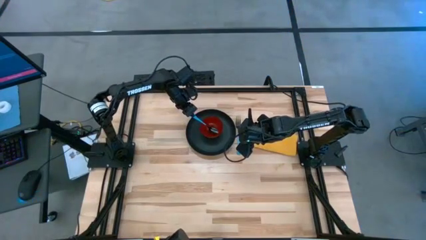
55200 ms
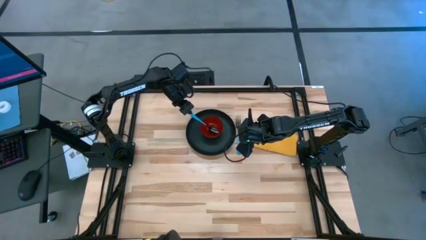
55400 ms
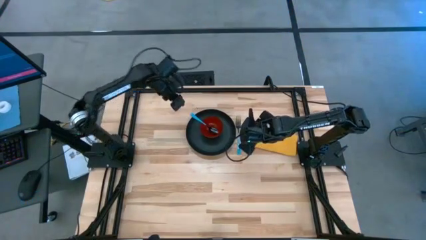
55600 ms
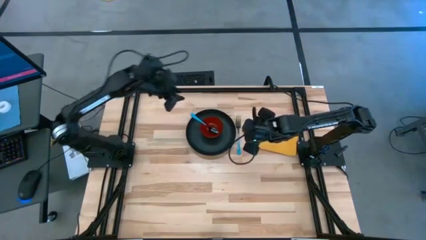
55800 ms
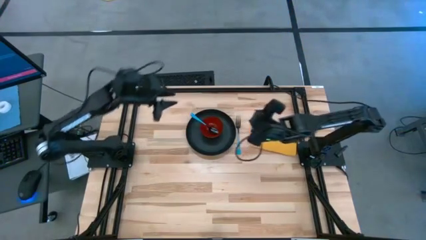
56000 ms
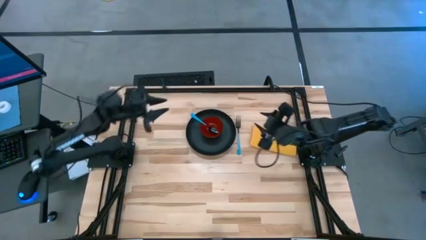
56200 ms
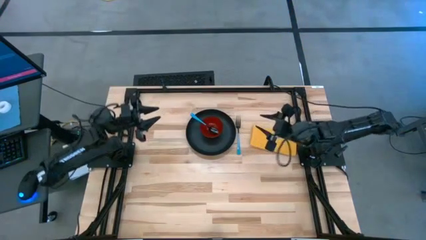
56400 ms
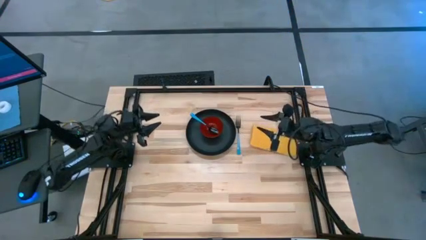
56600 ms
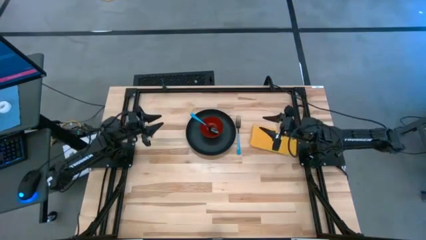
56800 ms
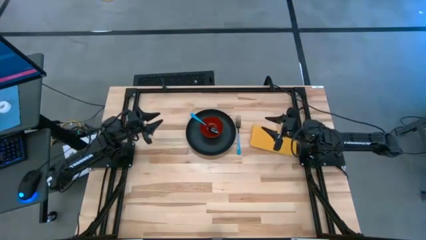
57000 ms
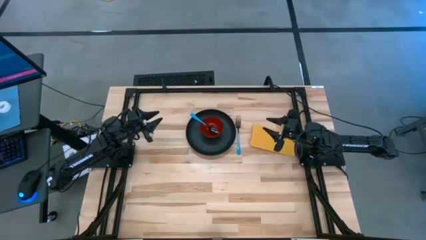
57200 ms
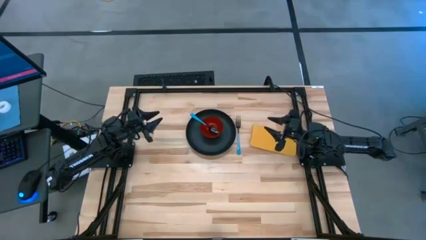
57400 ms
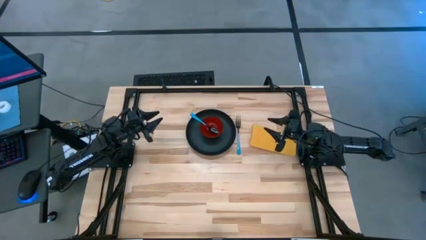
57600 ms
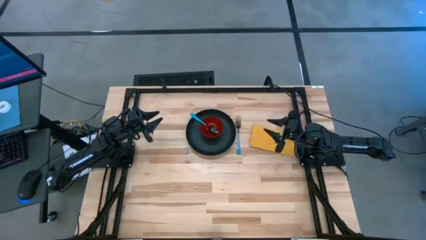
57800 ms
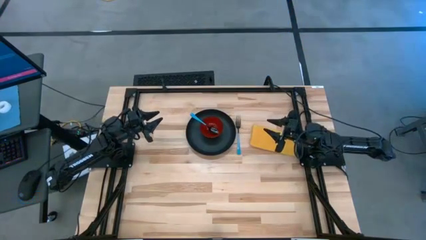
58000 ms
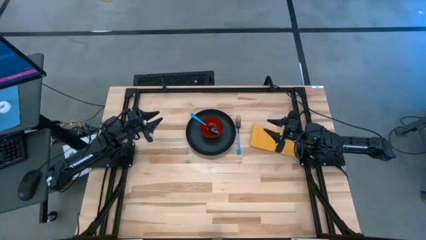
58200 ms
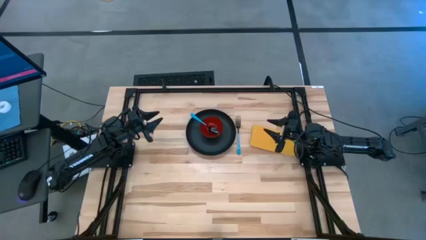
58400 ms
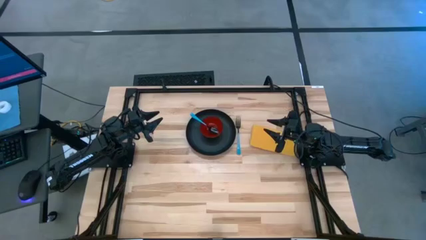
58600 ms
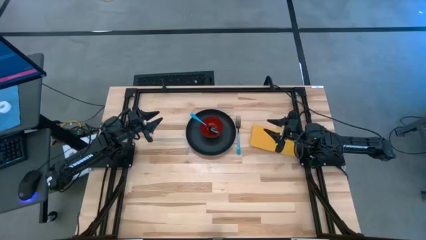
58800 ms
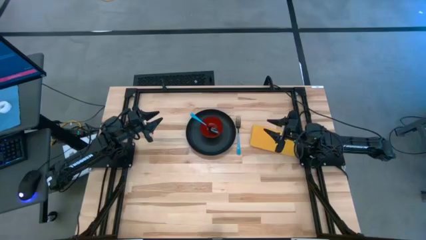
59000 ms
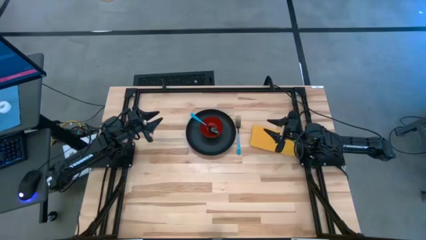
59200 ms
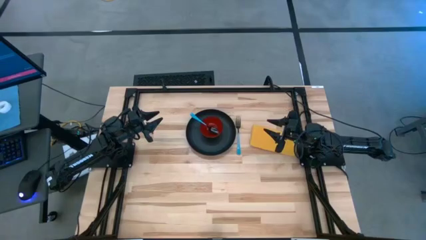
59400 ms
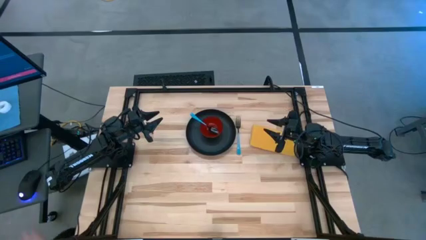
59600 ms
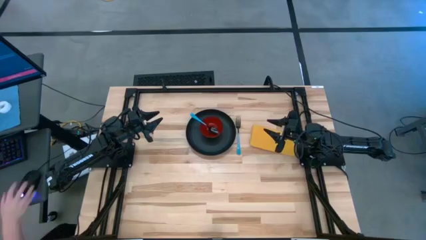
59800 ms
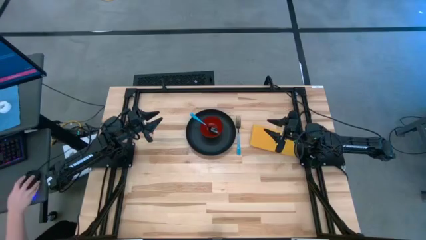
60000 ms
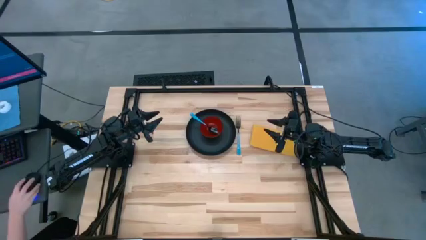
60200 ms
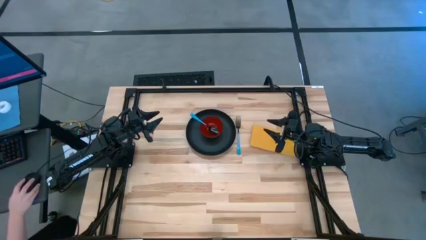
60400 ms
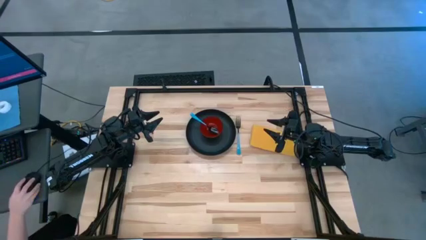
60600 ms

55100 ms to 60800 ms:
Task: Set table place
Return to Home Position

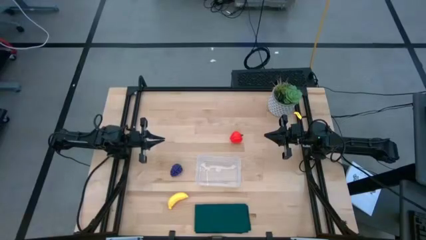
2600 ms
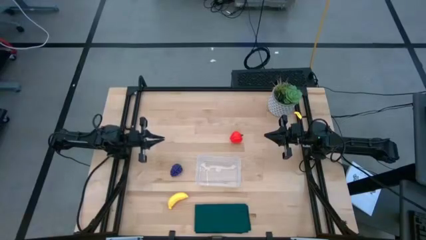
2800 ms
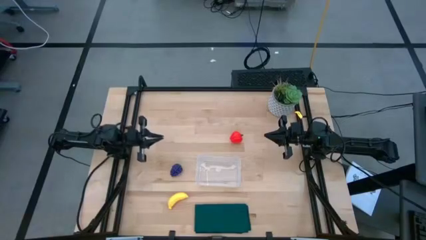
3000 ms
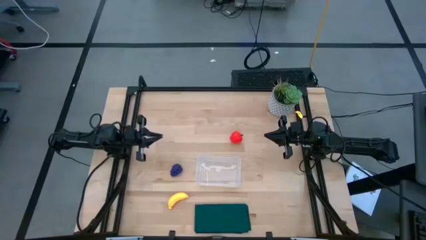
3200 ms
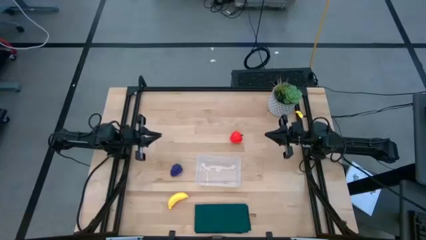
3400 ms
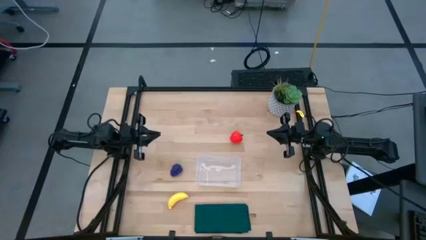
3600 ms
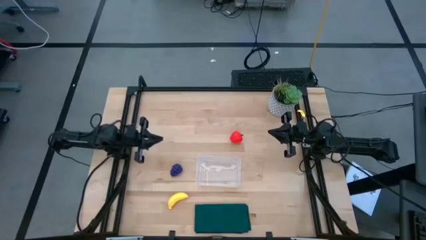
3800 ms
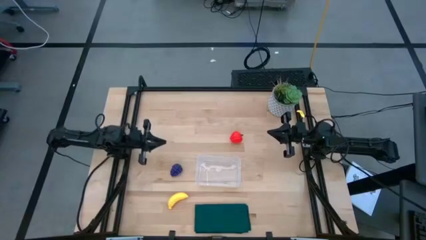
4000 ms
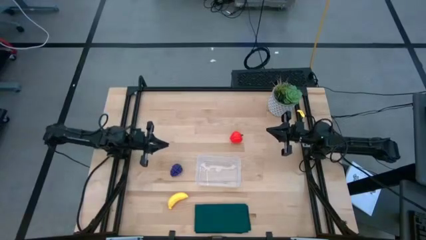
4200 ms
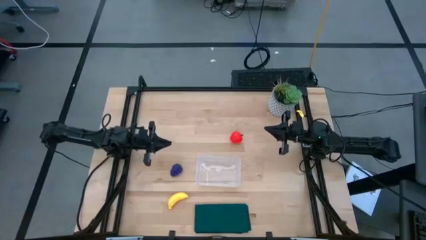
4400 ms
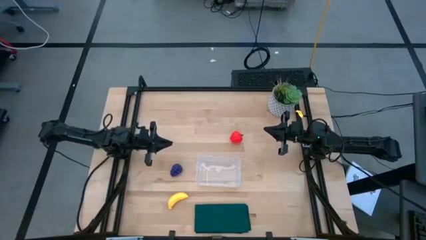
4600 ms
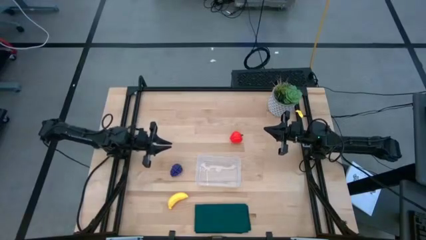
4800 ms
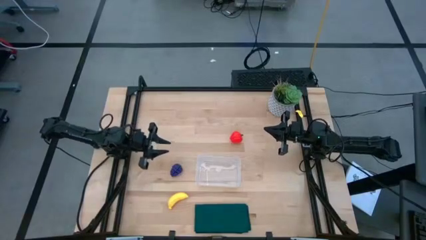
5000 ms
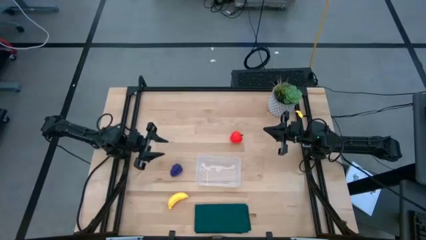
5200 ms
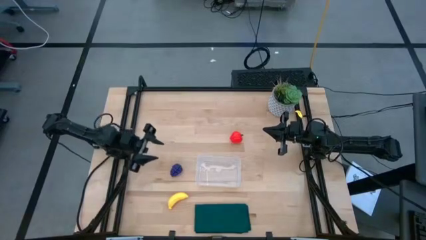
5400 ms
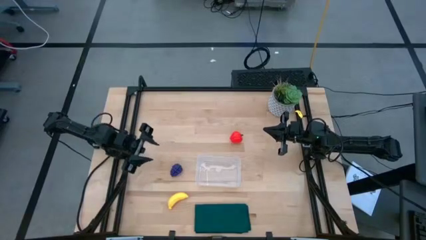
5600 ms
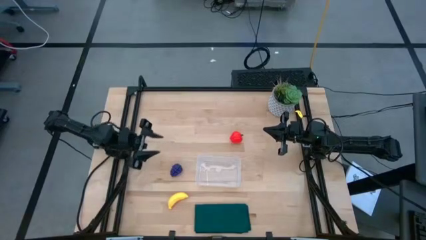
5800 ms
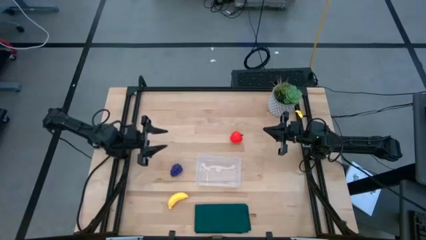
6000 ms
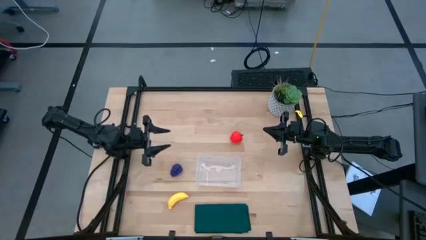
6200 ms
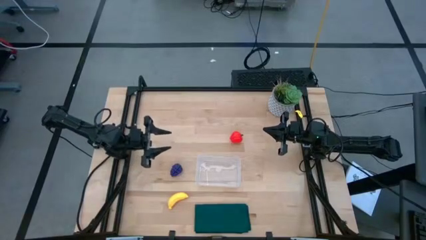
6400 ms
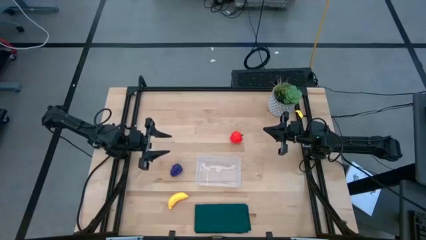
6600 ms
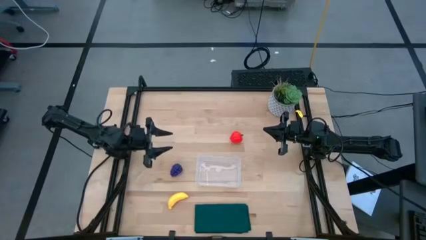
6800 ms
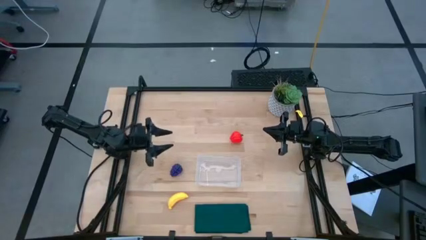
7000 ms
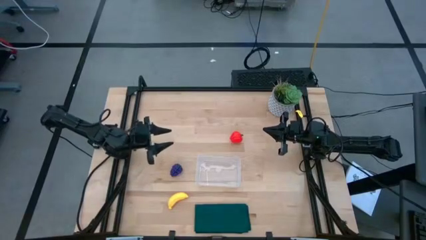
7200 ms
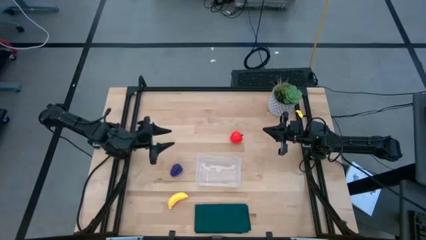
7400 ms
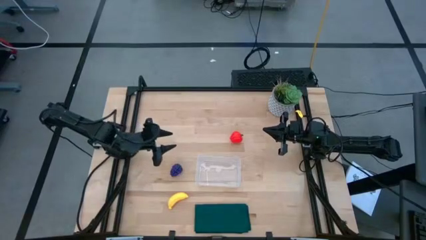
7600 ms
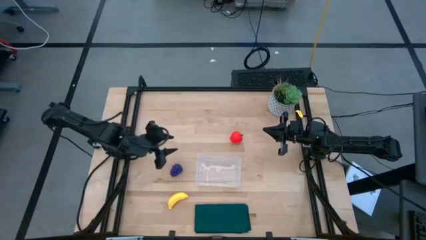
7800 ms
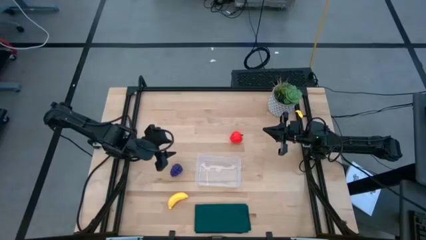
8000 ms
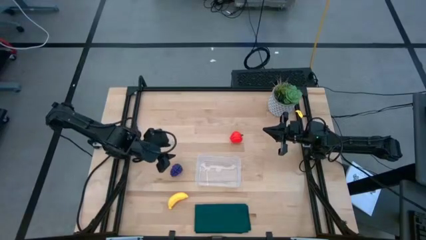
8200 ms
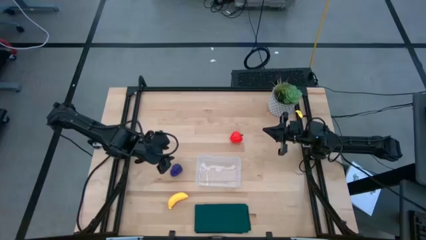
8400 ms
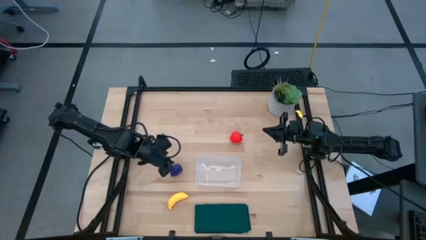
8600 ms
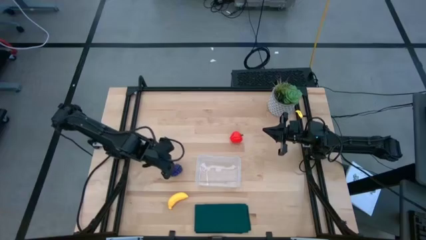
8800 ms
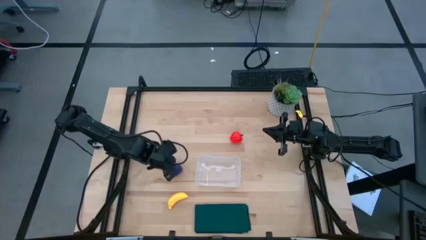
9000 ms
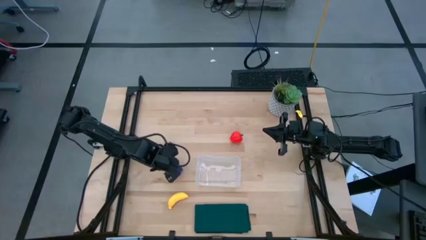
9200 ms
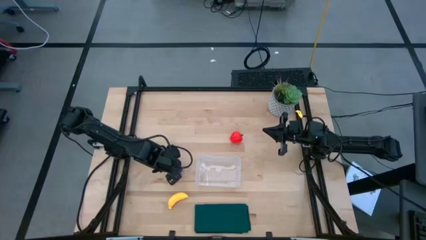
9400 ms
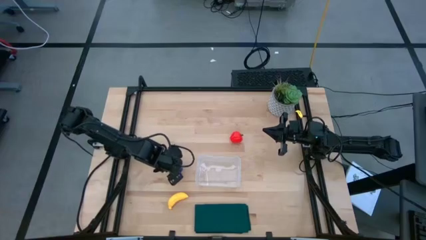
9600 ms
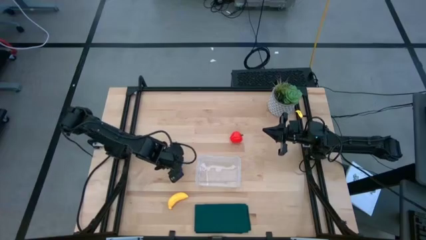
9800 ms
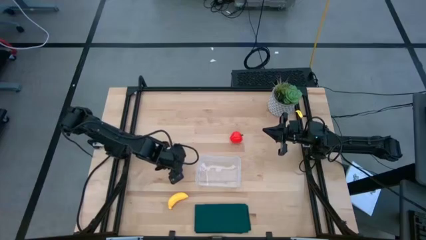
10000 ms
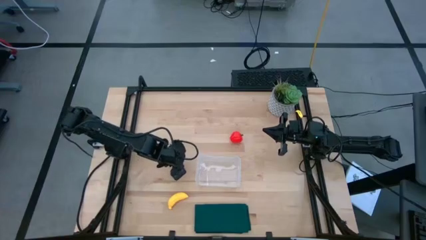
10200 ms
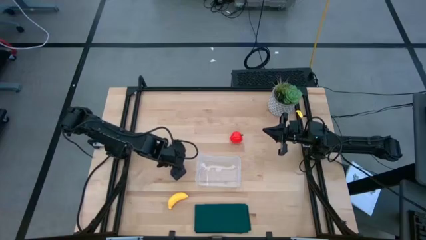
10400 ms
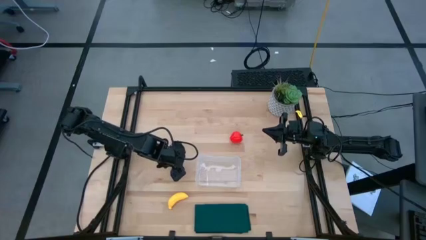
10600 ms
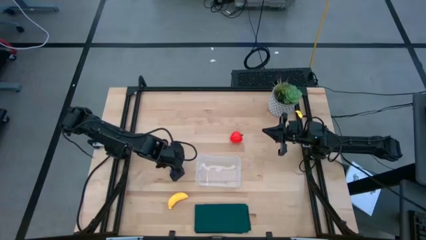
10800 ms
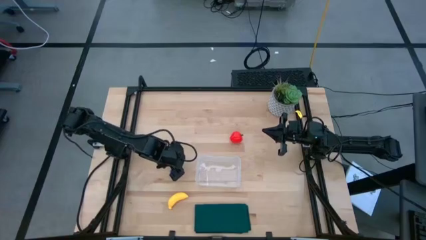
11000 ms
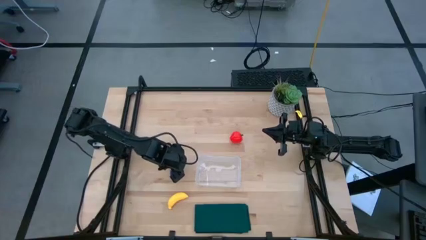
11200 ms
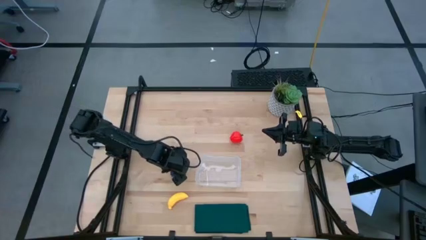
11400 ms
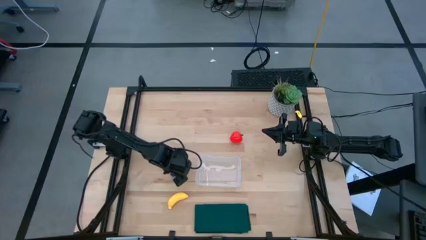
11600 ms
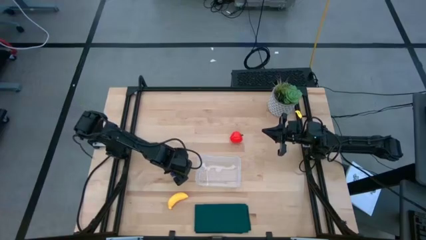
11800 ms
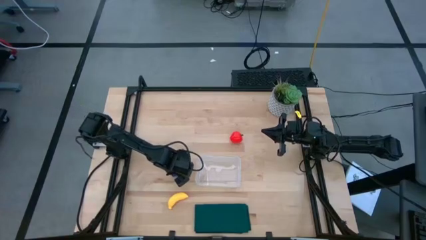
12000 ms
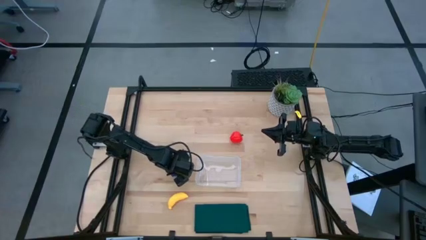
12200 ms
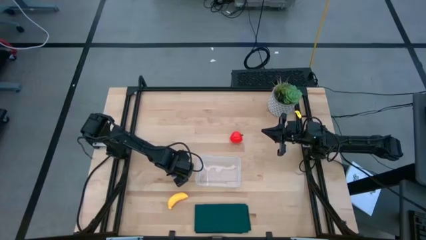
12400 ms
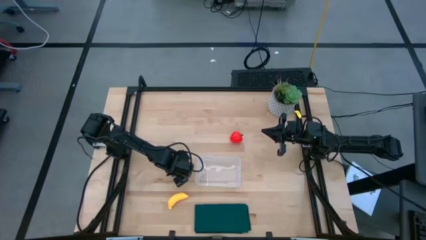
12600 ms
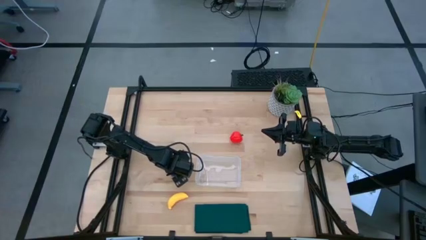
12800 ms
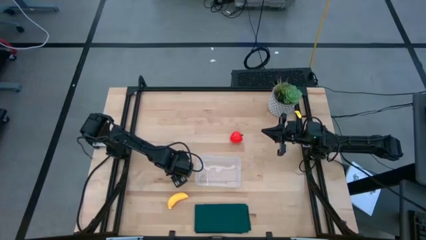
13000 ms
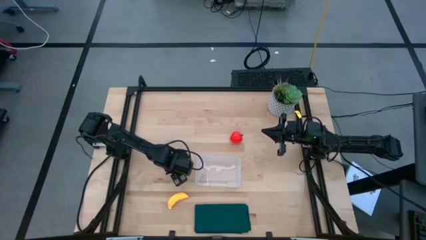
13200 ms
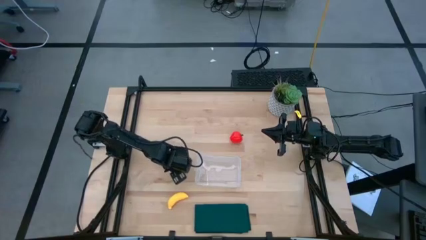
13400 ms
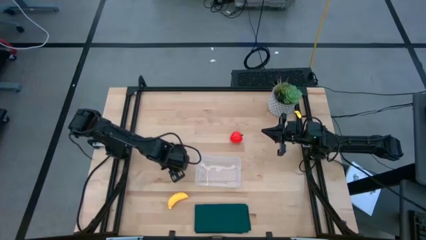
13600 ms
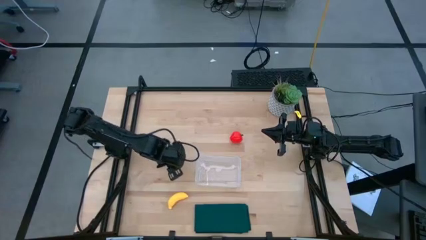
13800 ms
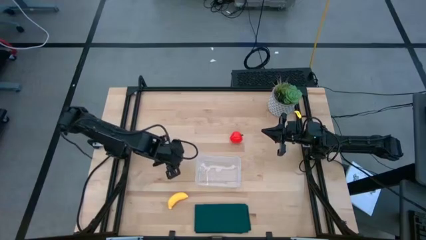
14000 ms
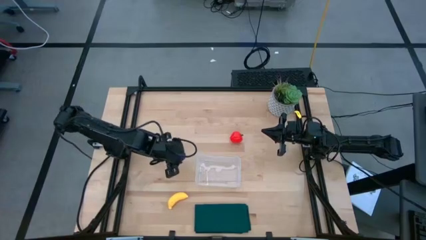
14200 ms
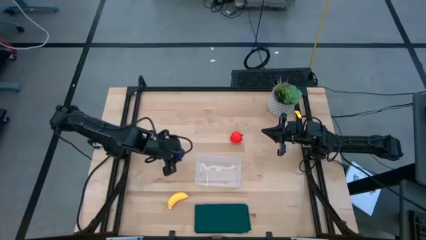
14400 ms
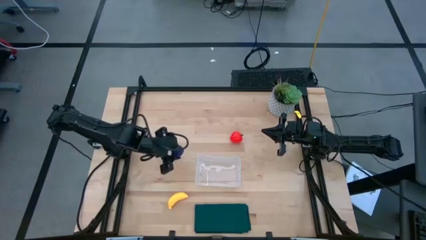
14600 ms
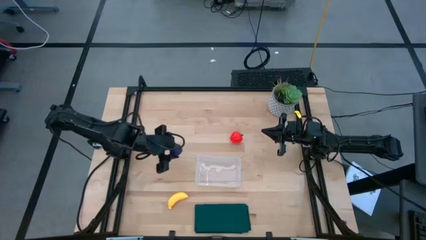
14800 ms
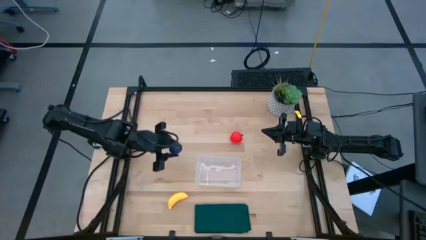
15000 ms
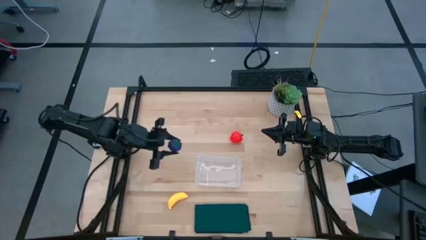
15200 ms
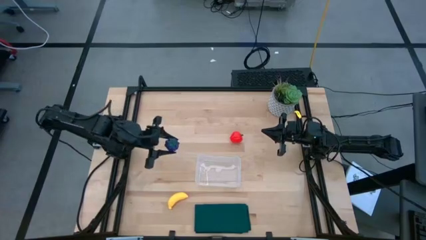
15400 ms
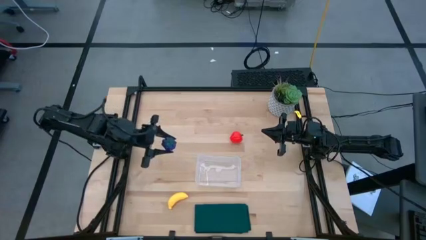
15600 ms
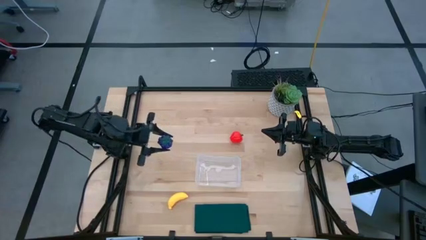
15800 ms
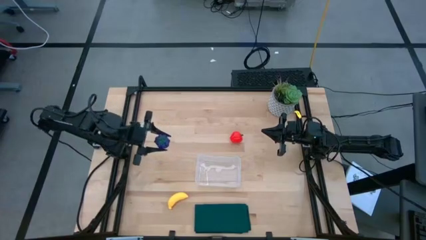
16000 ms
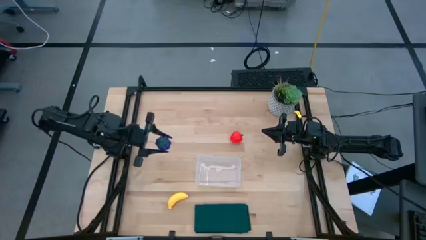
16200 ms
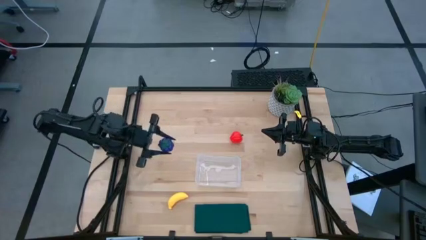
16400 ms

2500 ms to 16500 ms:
Task: Pick and placing Produce into tupperware
Put the grapes into the transparent bin
